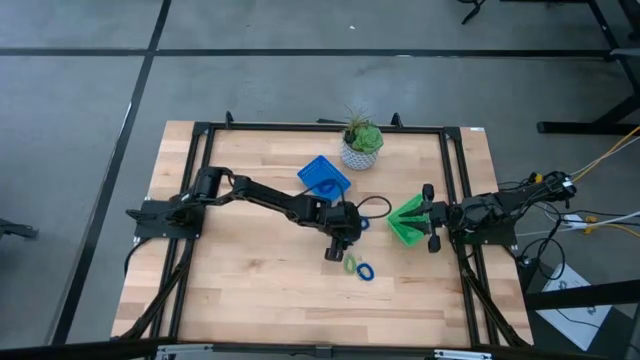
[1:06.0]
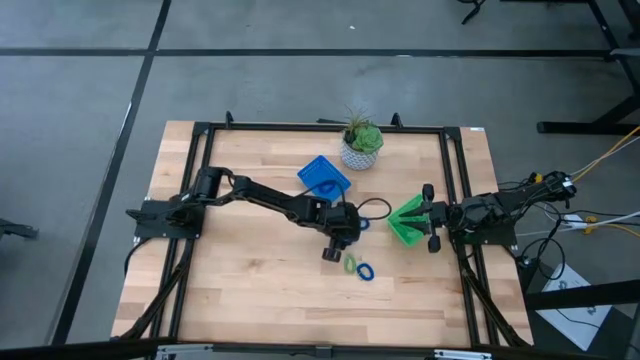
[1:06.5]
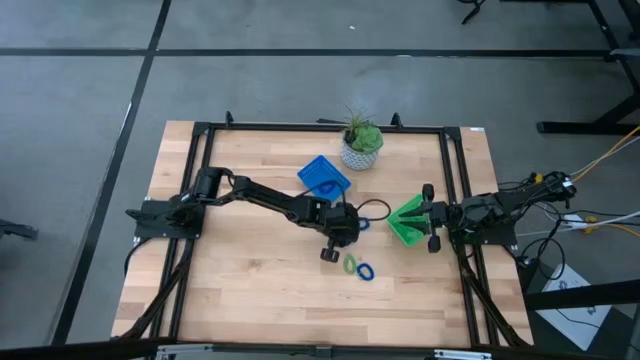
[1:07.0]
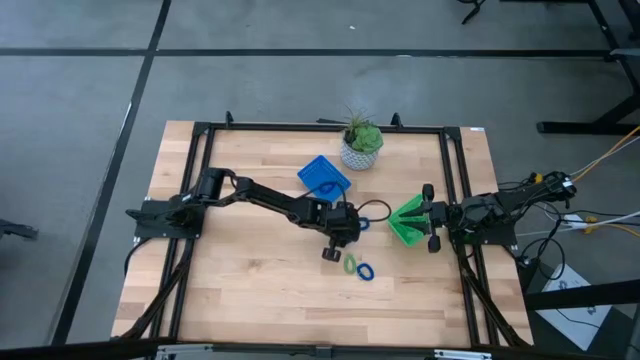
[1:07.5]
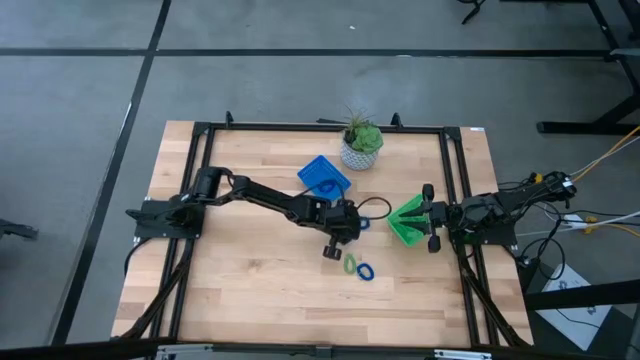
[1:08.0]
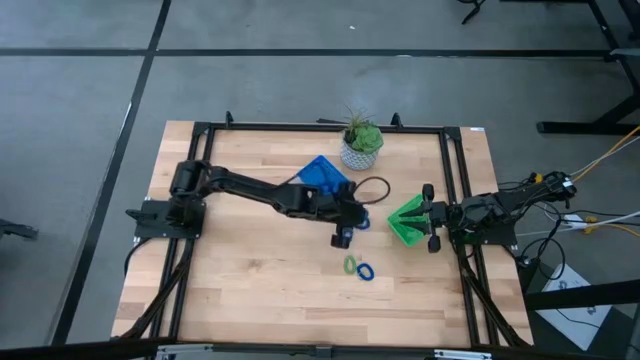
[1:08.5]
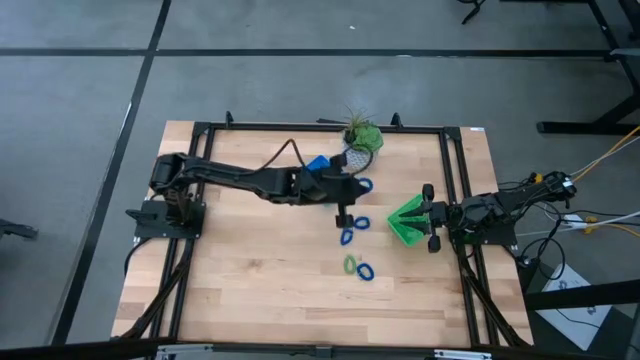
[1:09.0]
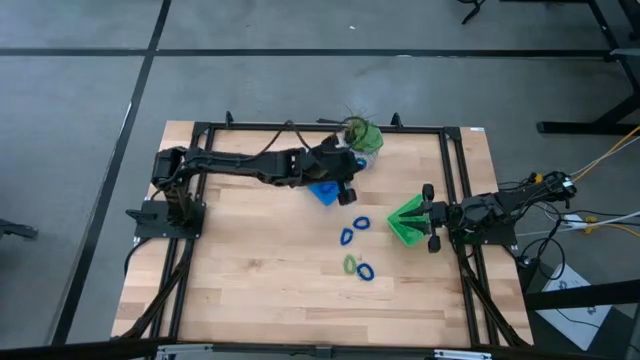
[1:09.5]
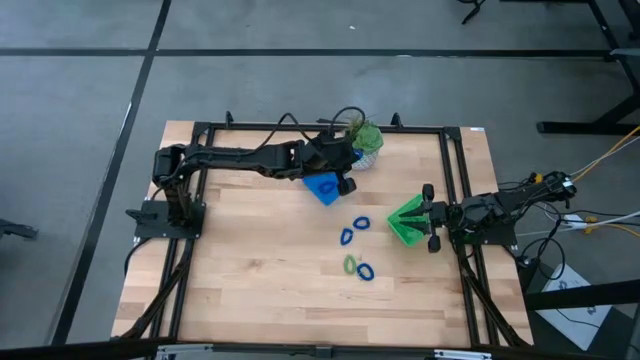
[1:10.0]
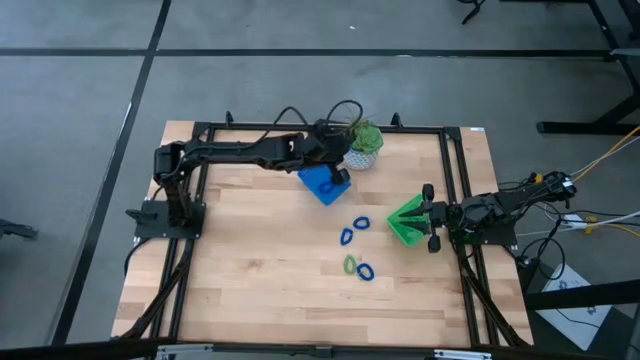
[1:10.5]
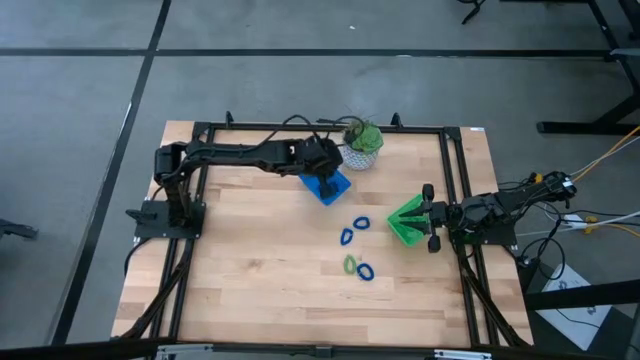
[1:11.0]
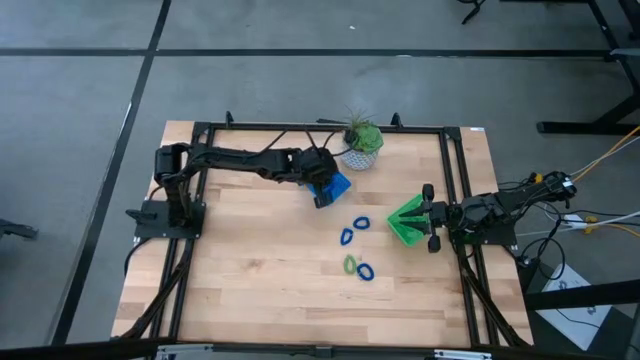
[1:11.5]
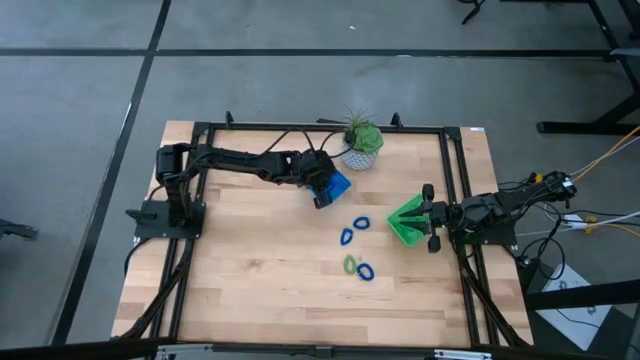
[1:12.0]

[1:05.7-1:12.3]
Task: Sort items
Put the blue spring keychain into the blue bin

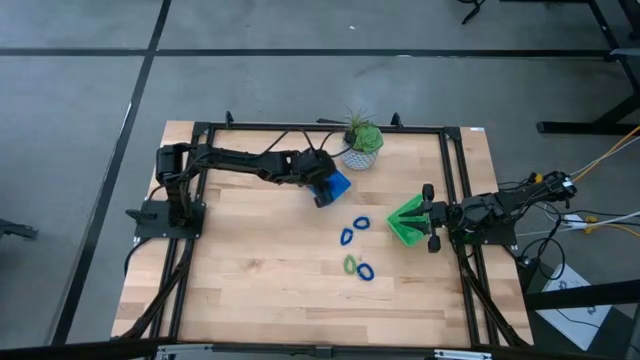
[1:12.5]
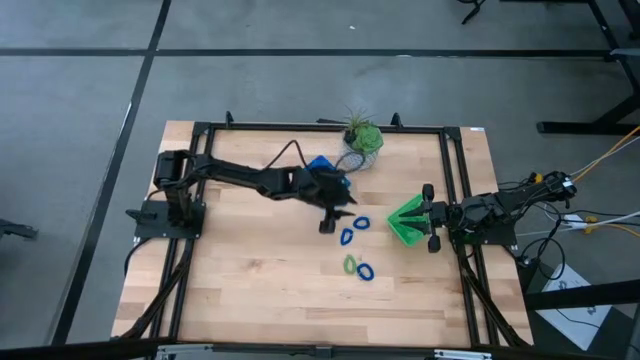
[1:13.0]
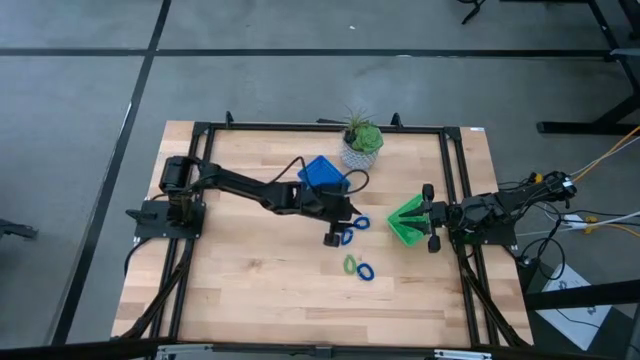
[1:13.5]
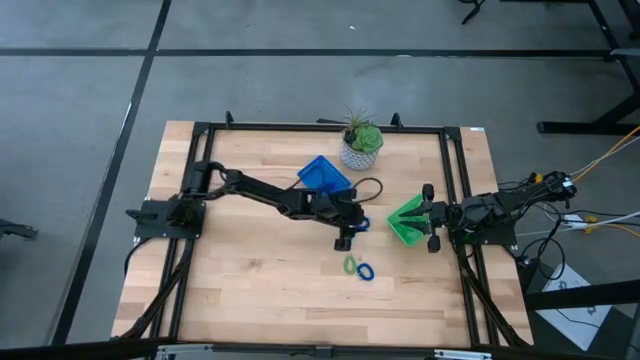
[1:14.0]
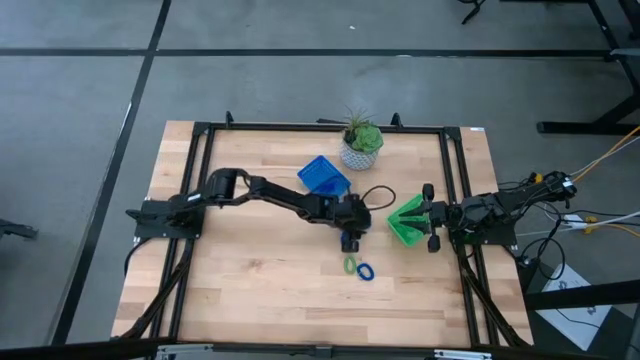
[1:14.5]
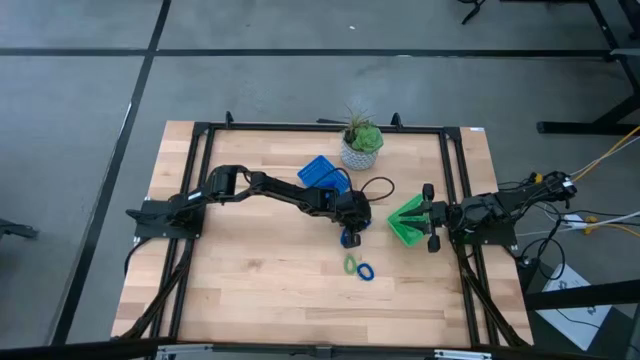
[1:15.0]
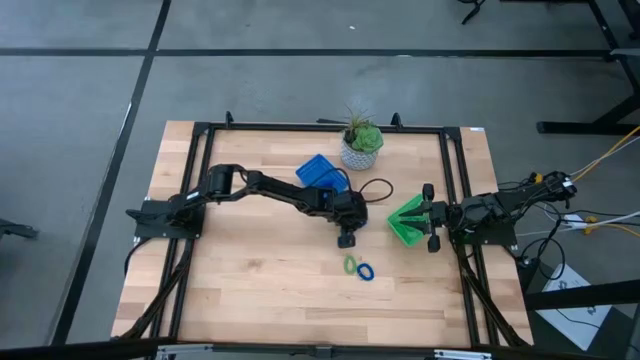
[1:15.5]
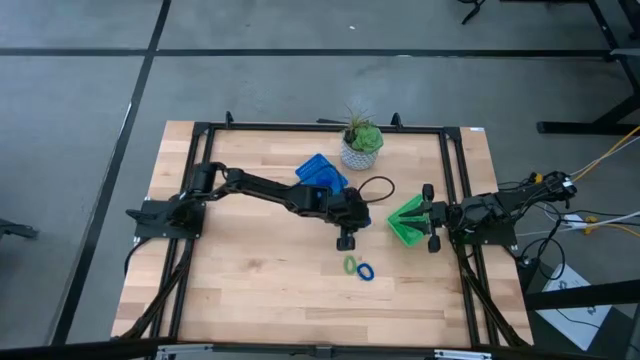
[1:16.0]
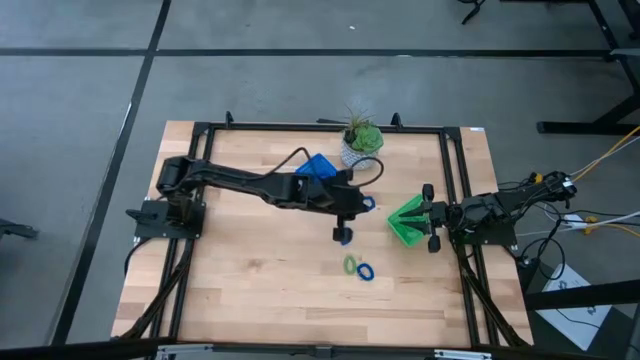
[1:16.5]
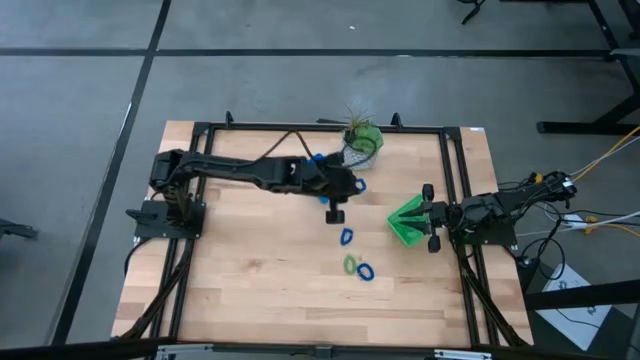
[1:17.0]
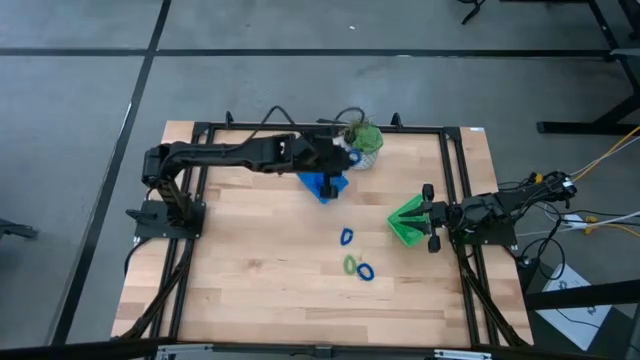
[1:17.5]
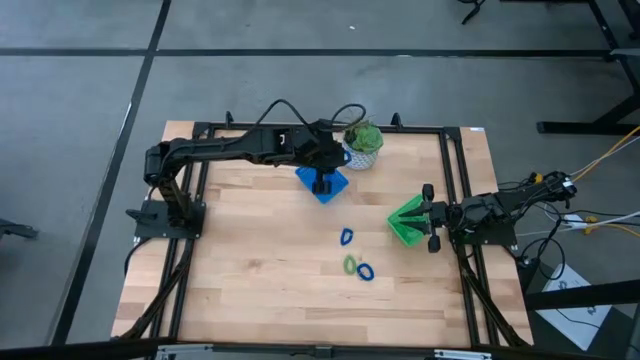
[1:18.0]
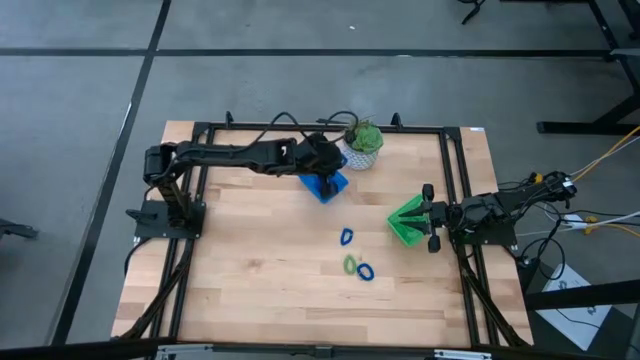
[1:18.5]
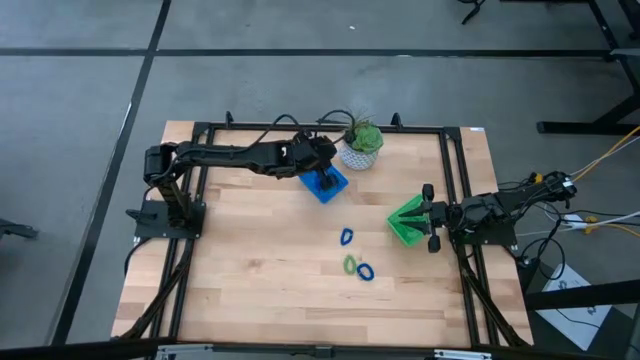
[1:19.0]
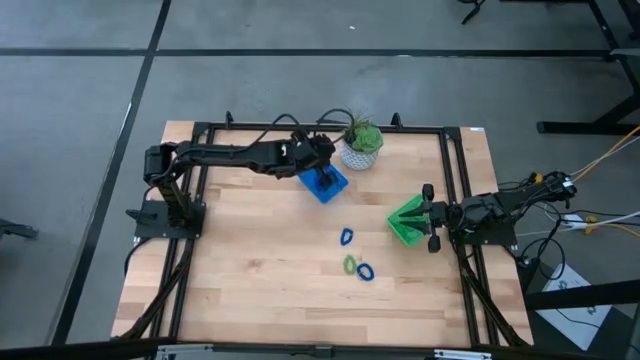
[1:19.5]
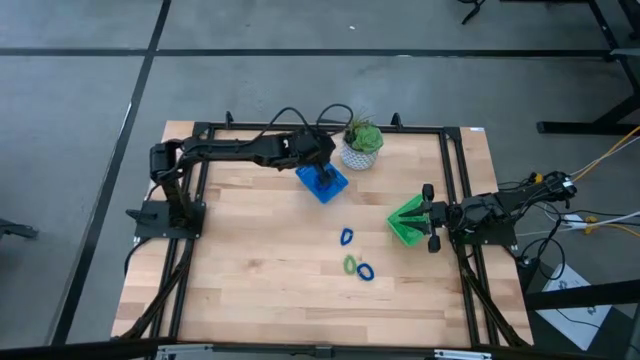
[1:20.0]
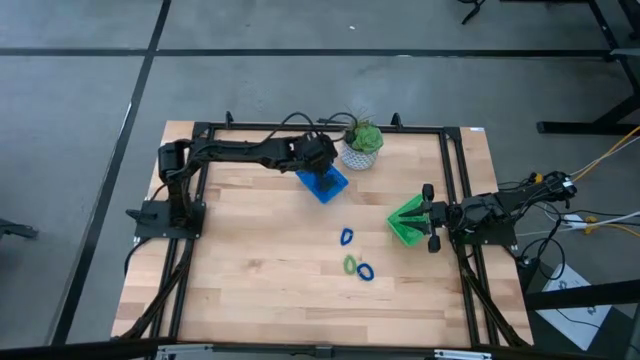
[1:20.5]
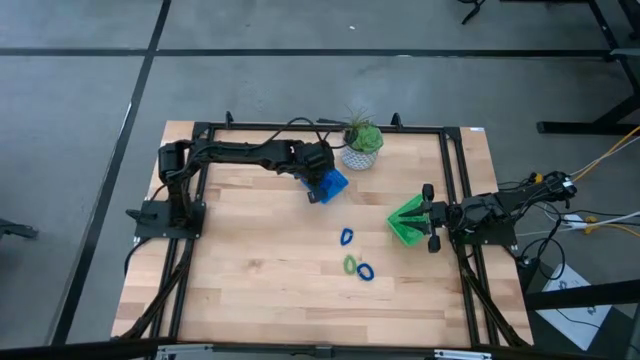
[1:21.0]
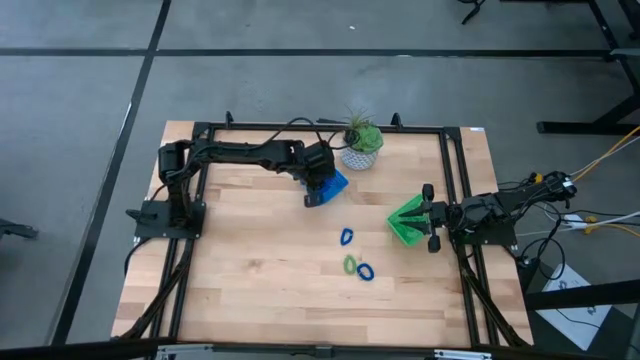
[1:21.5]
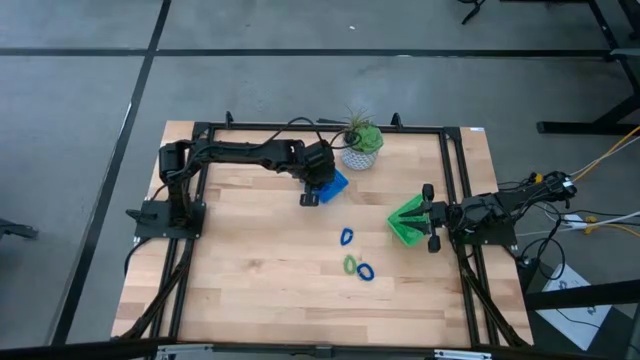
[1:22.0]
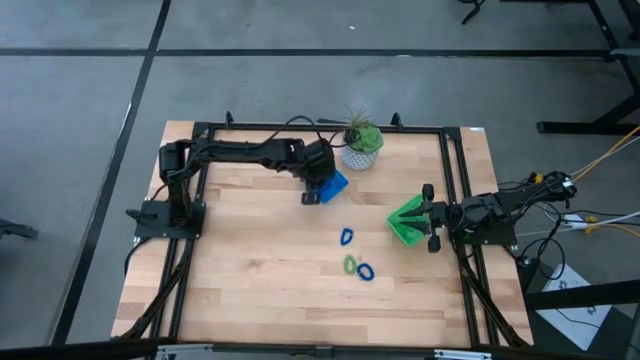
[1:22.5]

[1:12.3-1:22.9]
Put the blue spring keychain into the blue bin

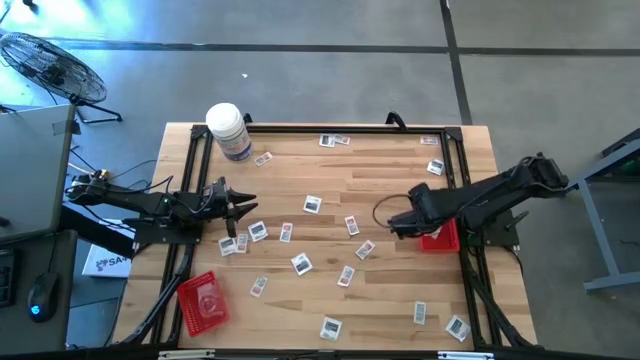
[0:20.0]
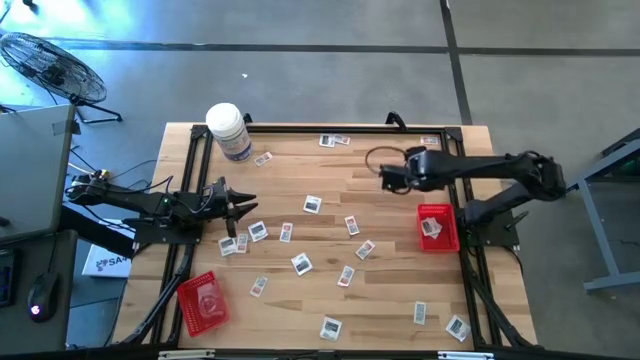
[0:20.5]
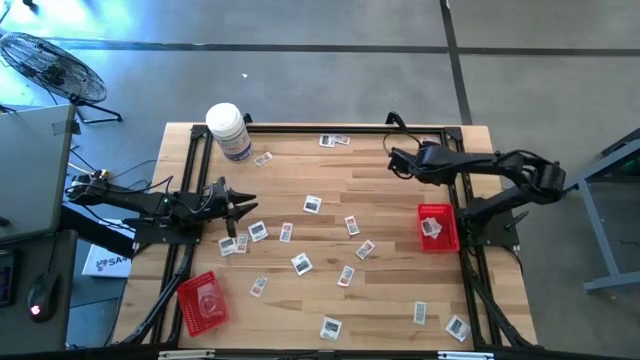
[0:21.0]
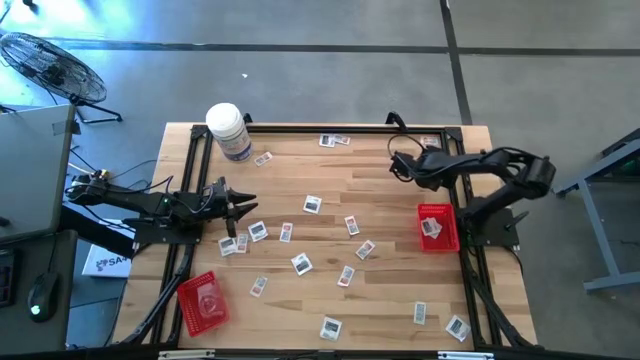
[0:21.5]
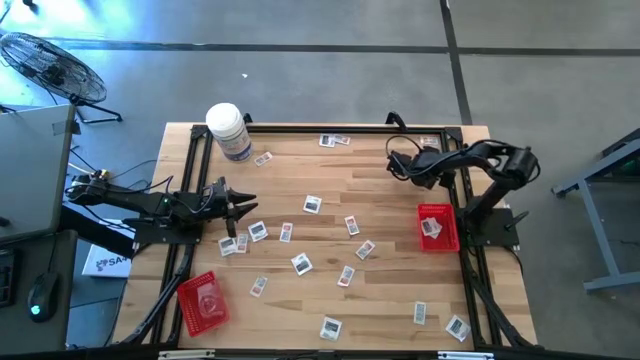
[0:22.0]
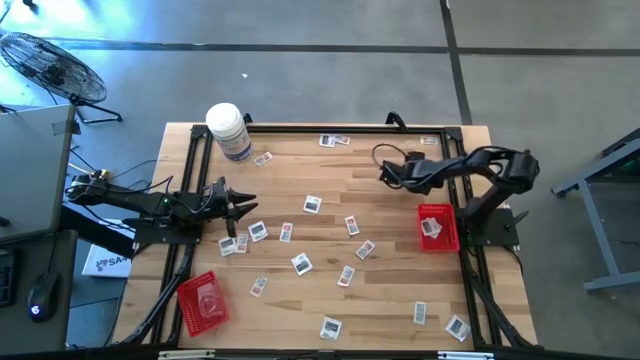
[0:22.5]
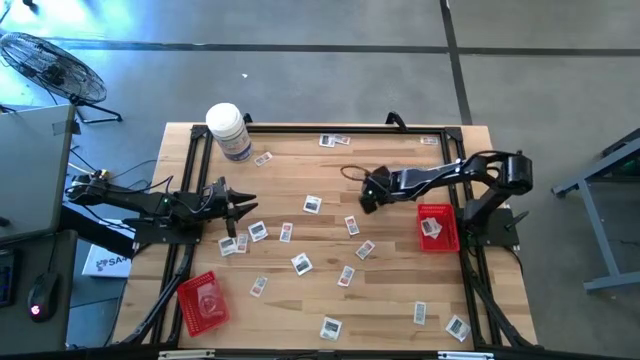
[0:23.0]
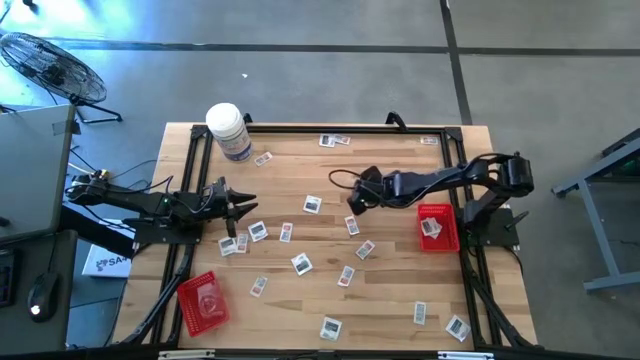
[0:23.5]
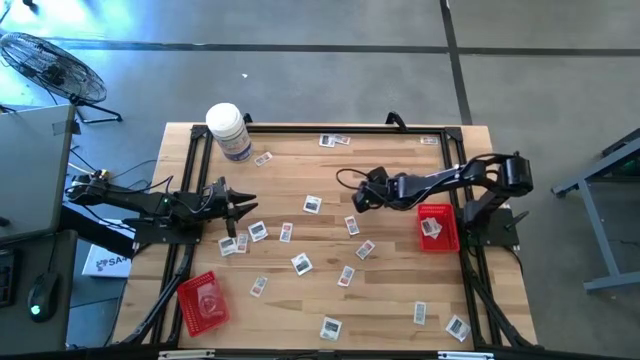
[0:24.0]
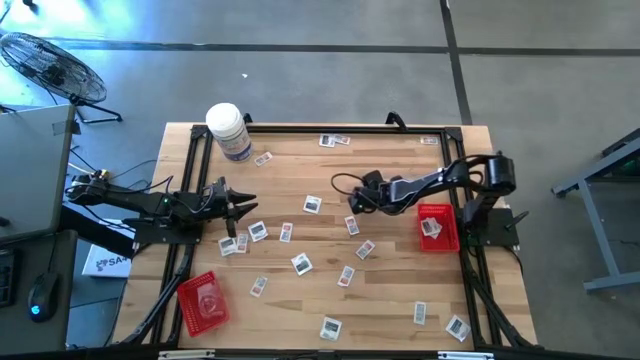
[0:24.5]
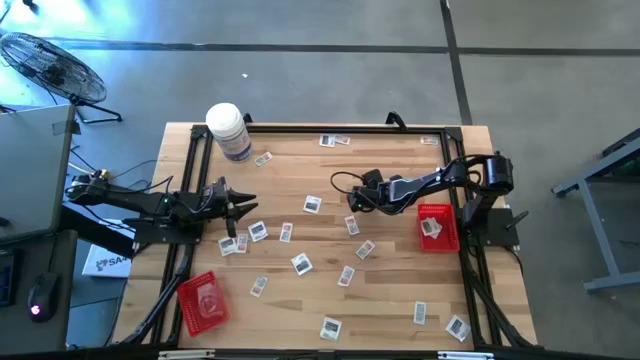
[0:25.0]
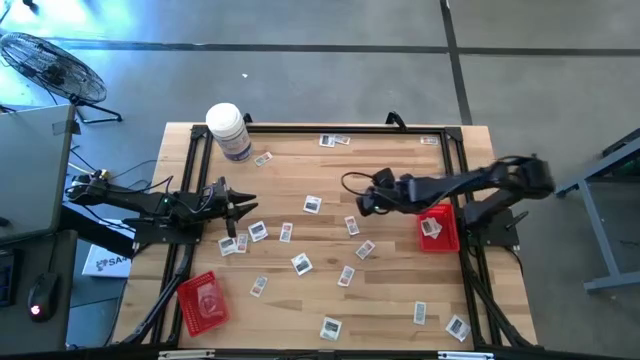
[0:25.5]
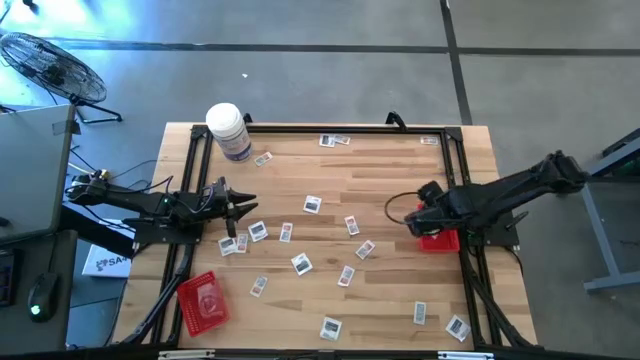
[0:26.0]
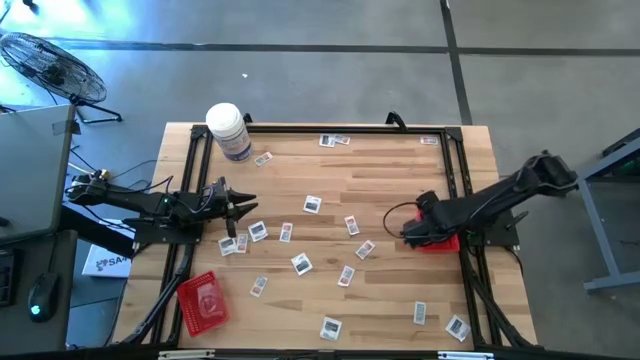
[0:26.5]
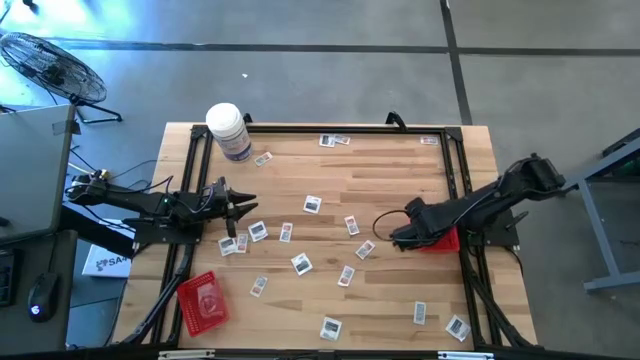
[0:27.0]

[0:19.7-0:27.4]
Task: Pick & Place First Aid Supplies
Put the towelette pack into the right red bin
